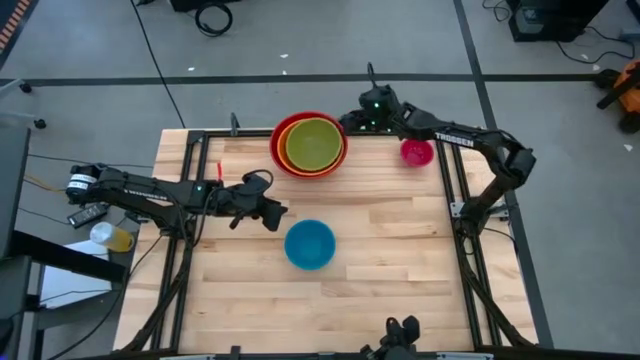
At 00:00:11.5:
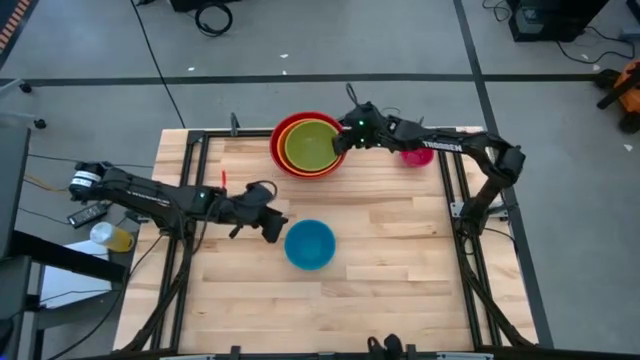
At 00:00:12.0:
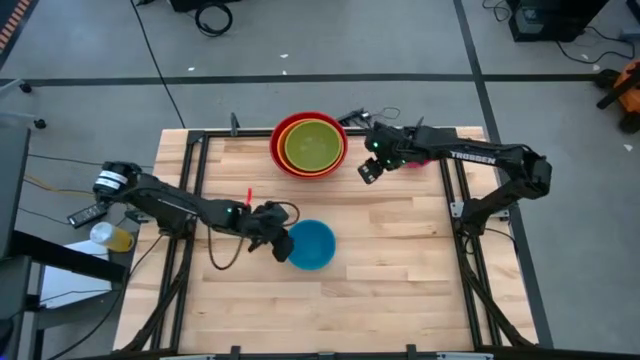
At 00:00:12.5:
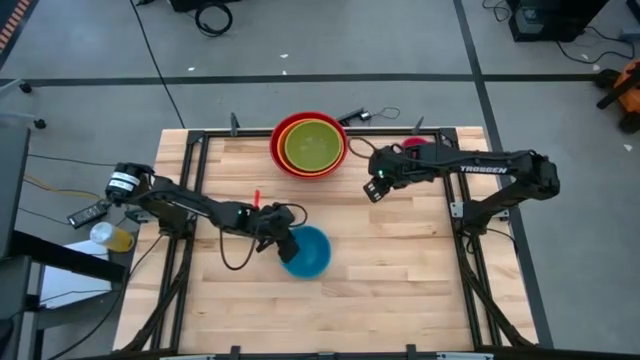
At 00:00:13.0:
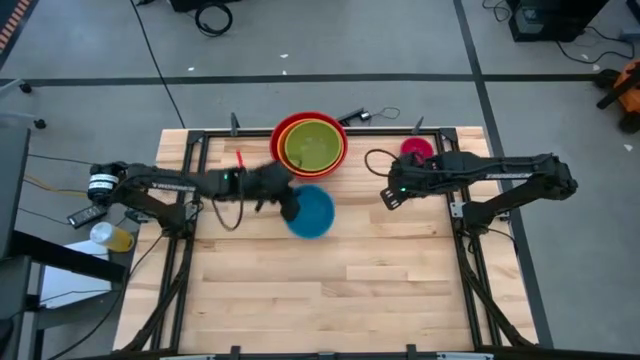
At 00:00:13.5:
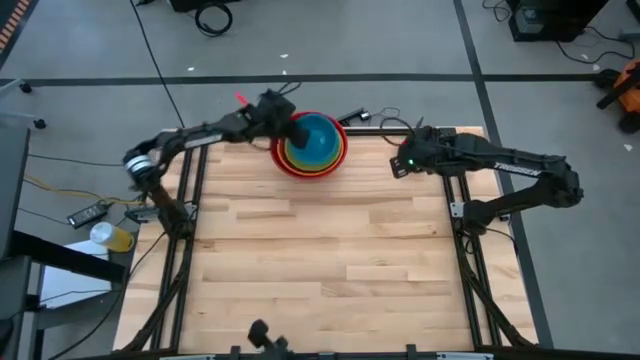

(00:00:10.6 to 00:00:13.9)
Stack the blue bowl into the green bowl

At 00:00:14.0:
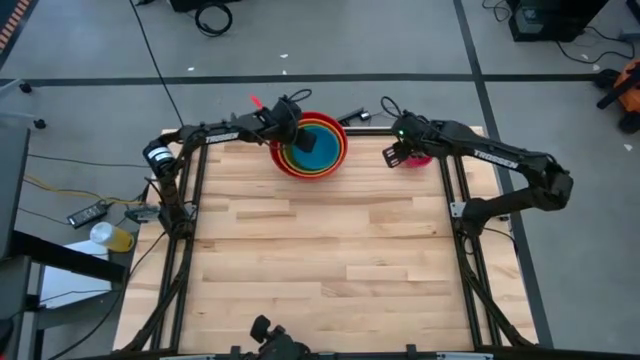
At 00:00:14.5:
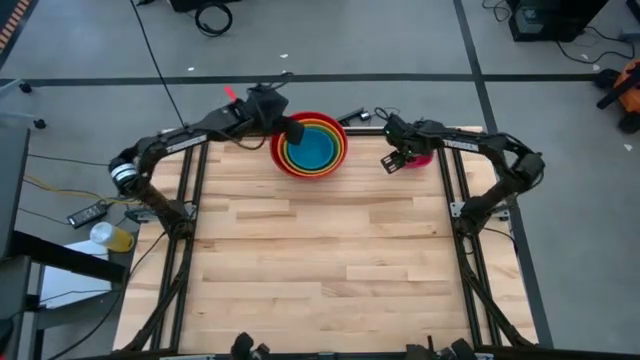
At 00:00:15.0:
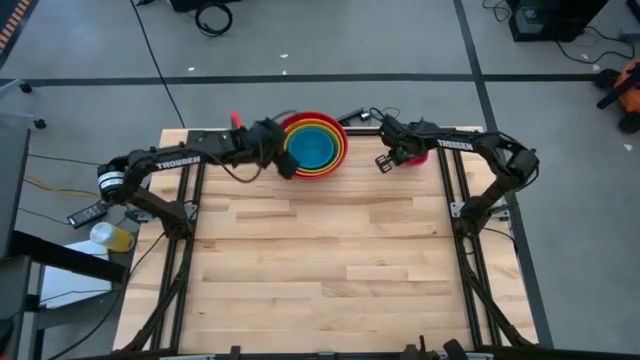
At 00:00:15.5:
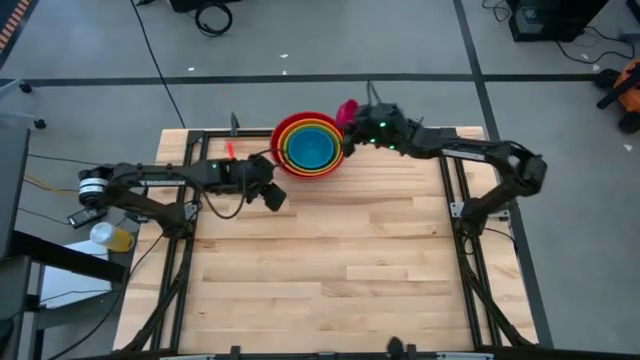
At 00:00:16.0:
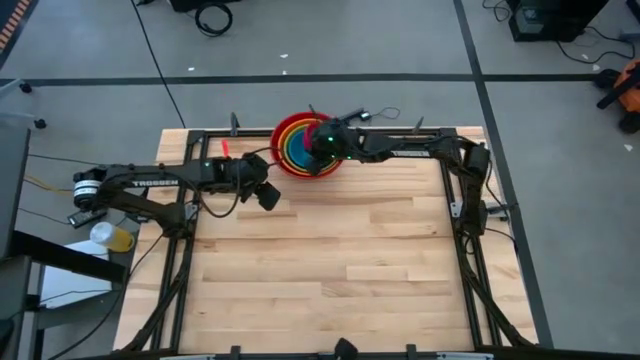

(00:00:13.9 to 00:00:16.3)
Stack the pink bowl into the blue bowl

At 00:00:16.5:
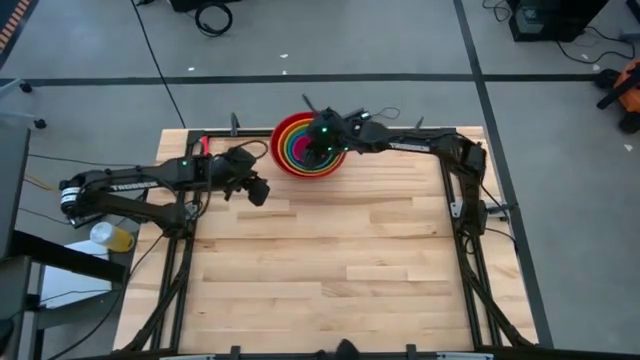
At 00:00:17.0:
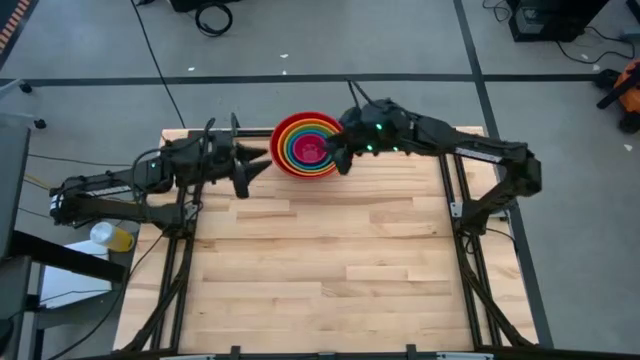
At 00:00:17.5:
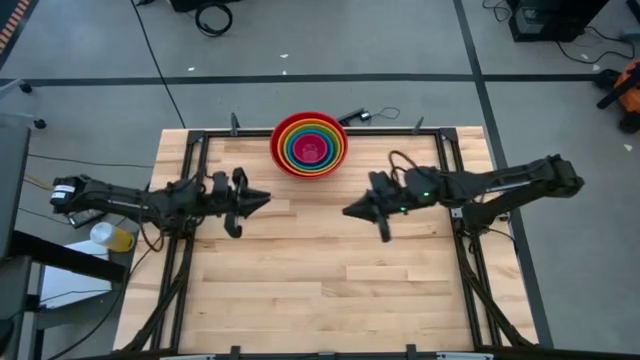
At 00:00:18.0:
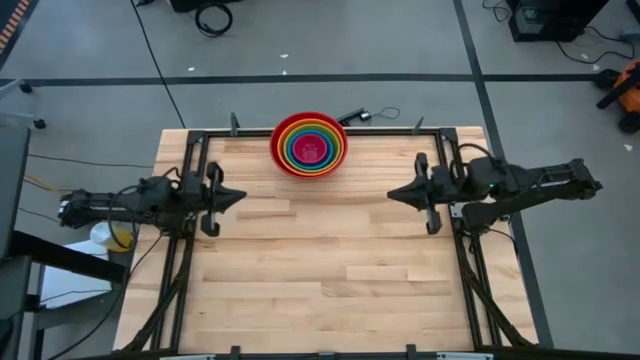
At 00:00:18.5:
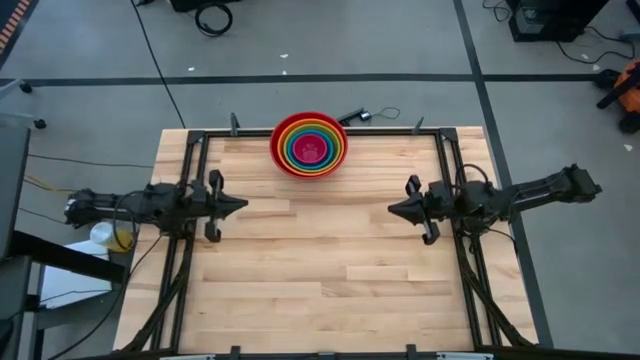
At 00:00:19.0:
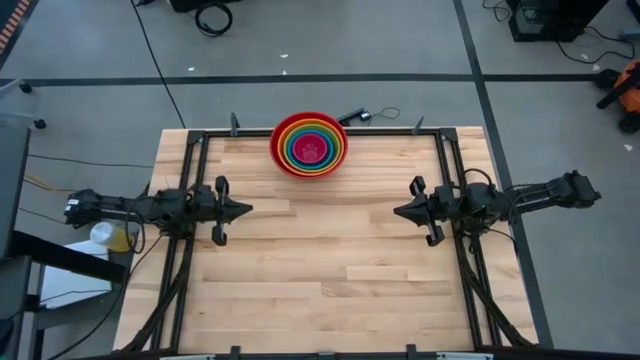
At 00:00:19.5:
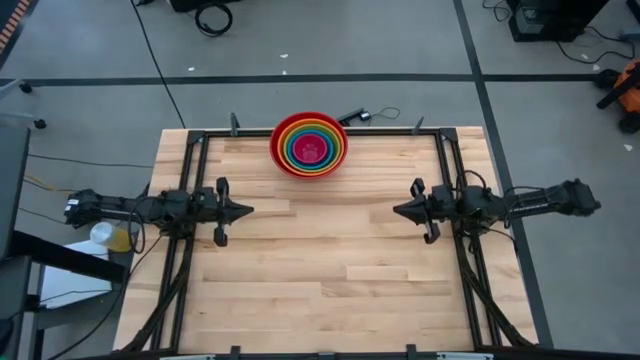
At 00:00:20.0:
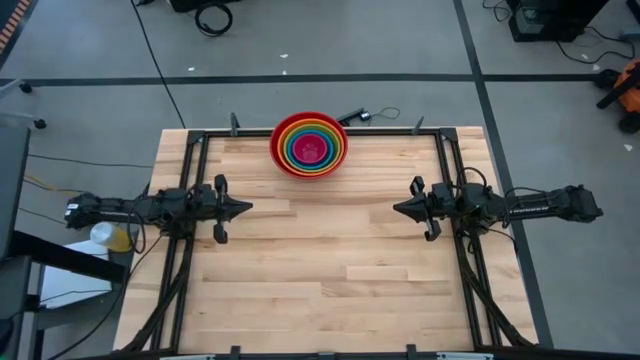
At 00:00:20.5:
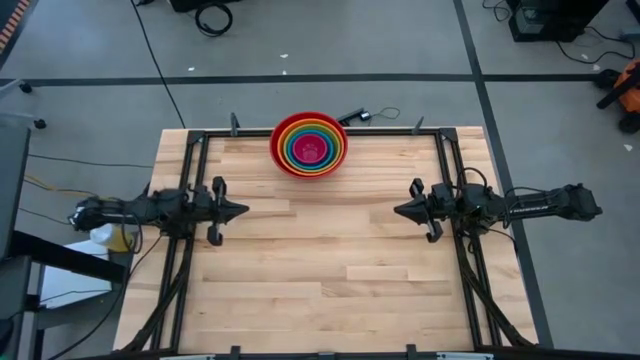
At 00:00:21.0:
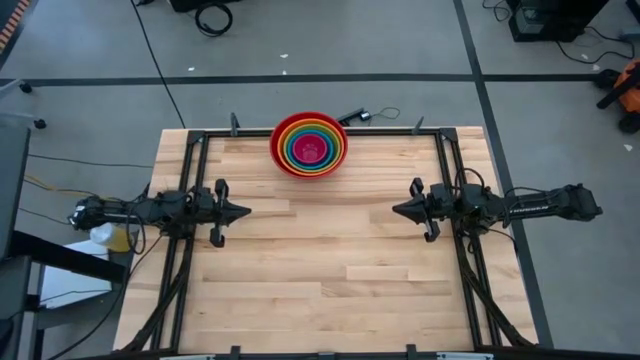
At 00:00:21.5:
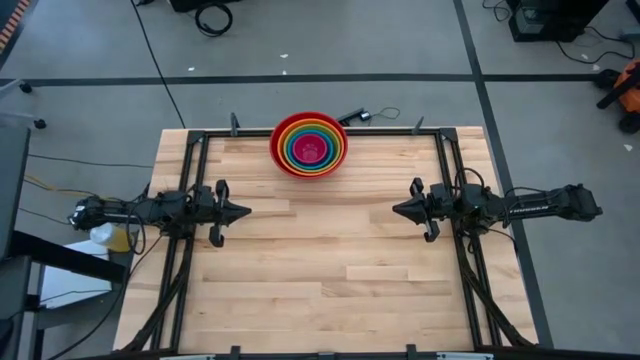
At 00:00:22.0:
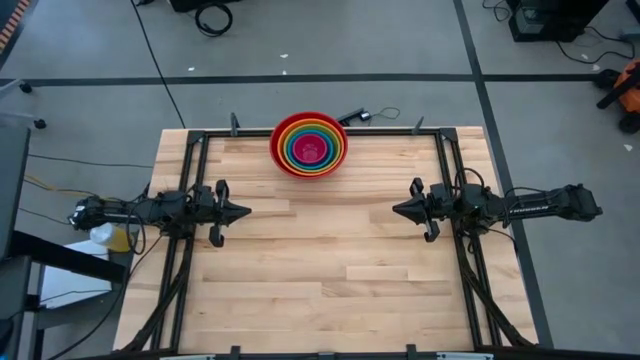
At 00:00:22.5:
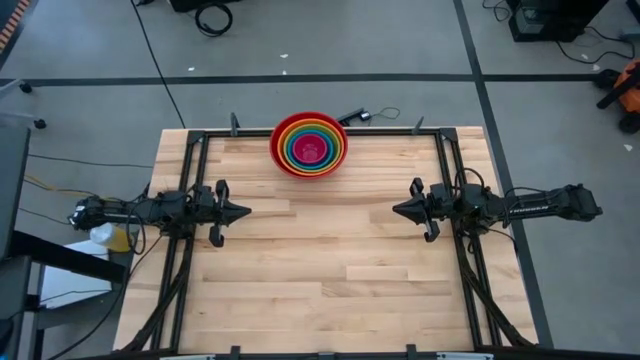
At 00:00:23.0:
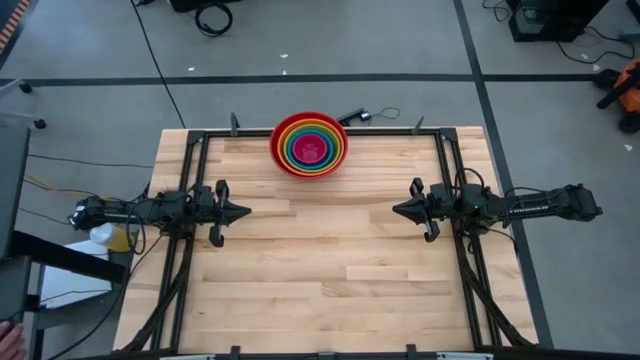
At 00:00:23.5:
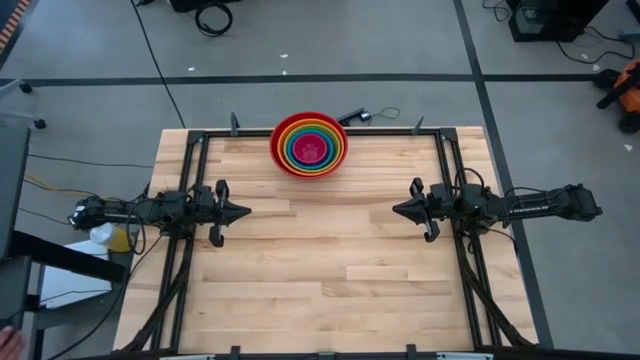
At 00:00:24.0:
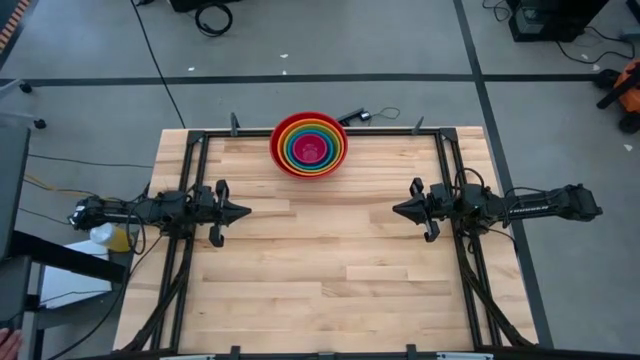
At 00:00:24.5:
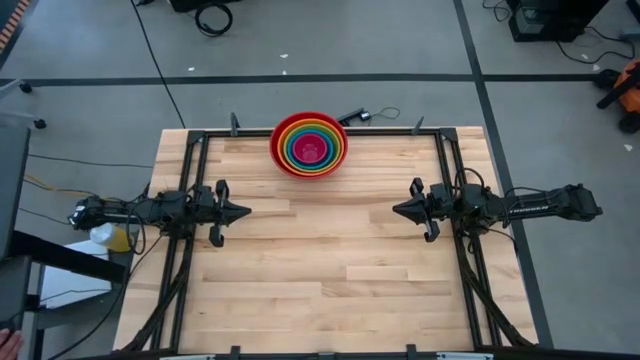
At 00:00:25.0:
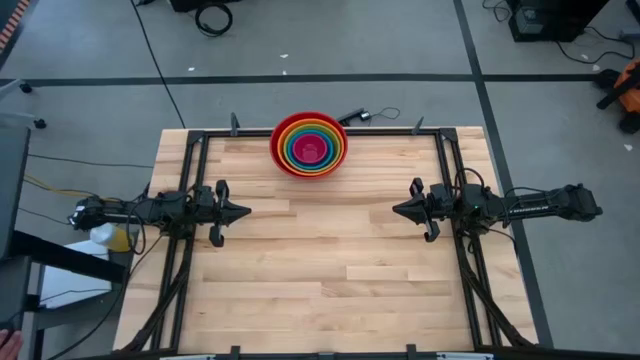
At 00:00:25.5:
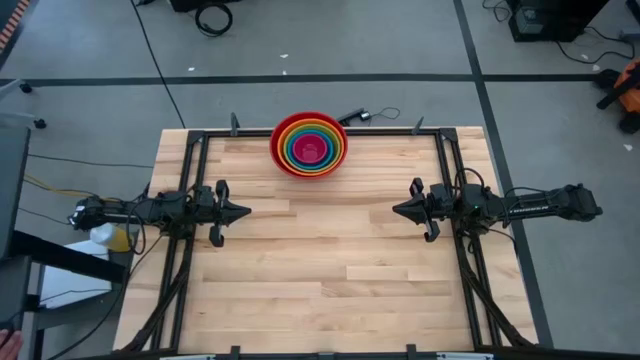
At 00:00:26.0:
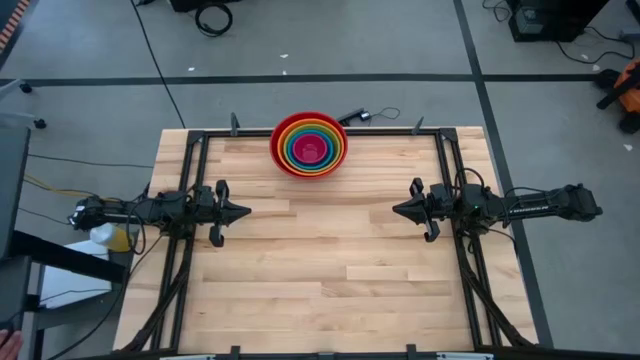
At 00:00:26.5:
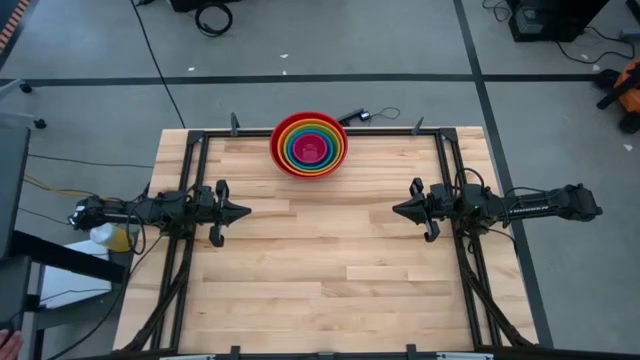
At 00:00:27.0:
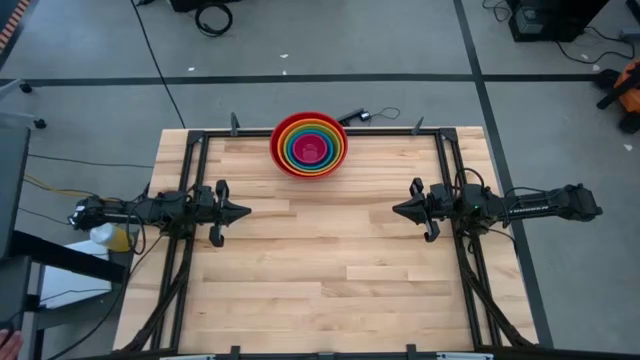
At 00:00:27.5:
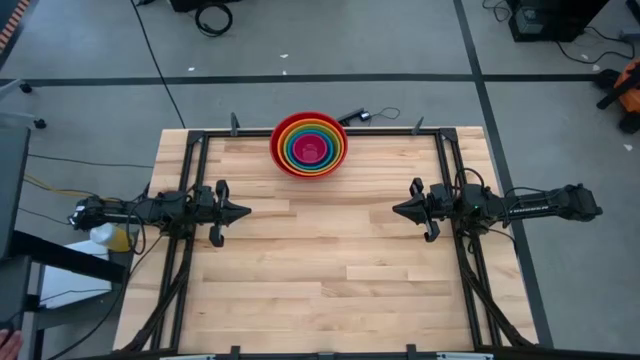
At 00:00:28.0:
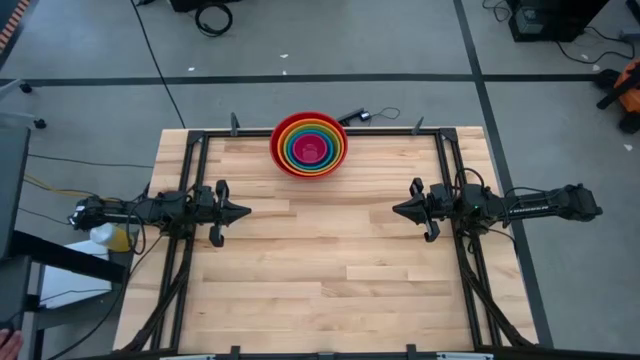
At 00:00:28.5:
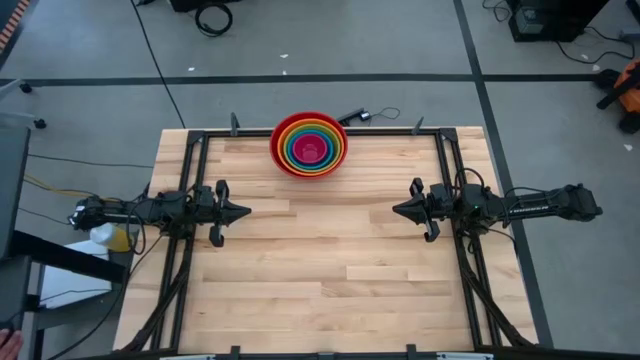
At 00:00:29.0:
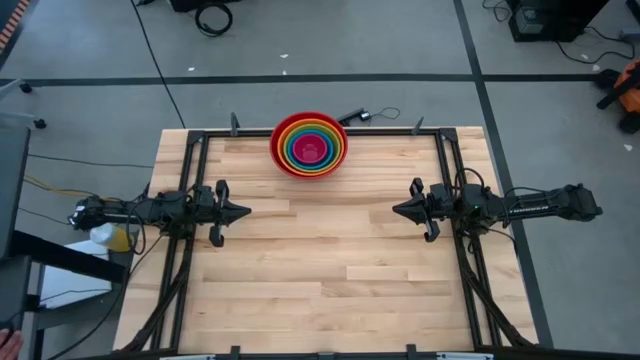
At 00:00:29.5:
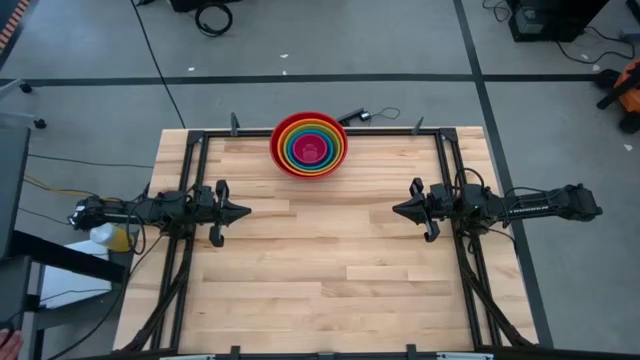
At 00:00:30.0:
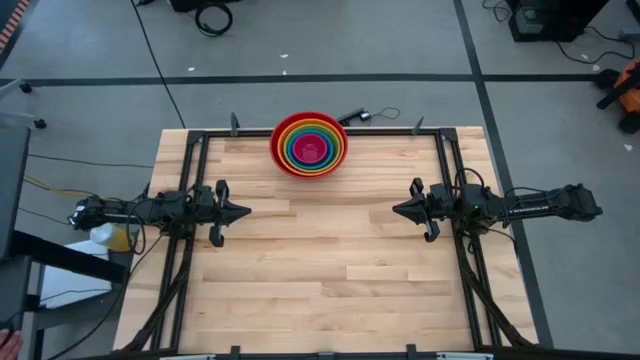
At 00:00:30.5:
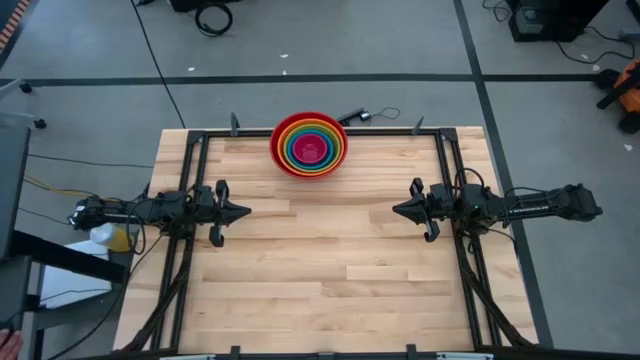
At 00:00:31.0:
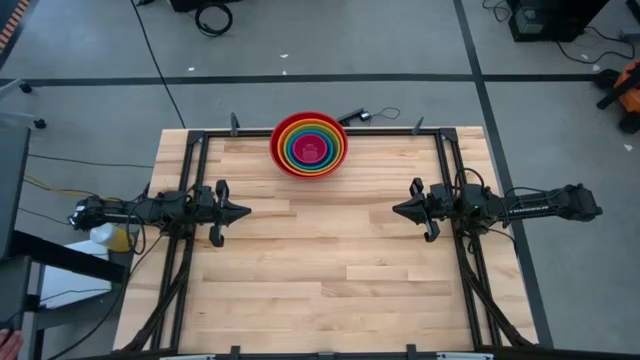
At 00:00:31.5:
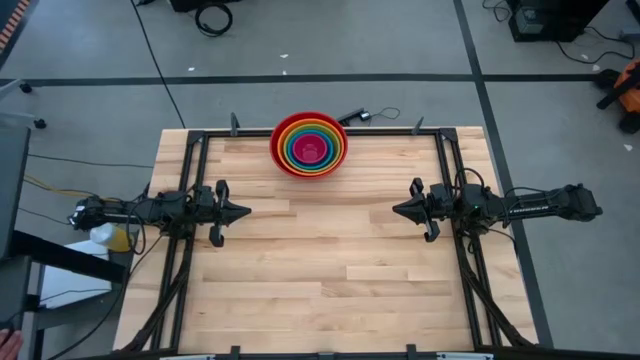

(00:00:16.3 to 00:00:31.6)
Return to Home Position
